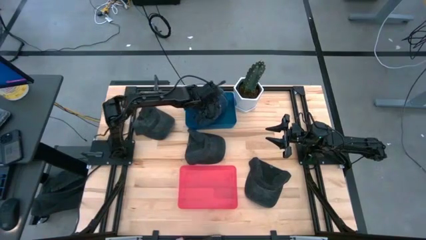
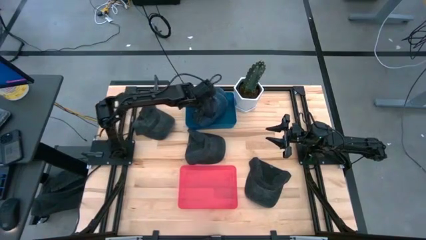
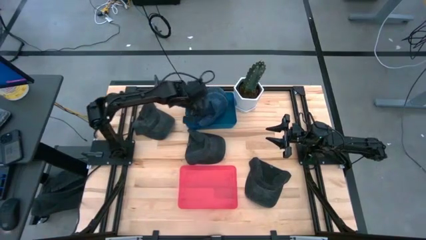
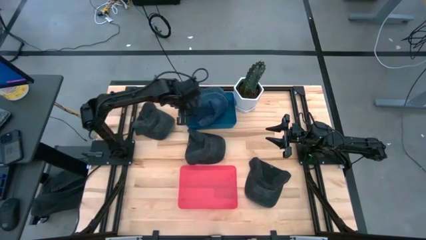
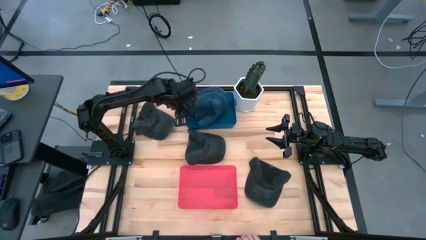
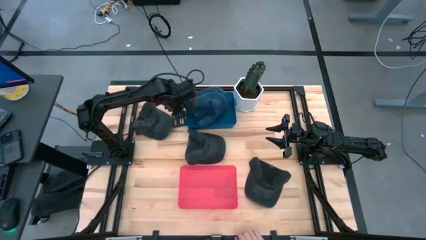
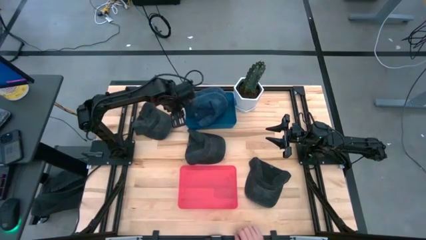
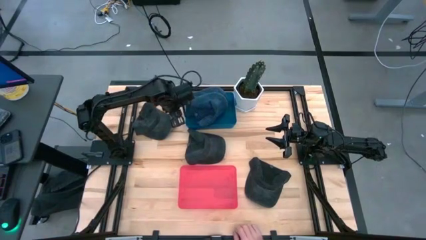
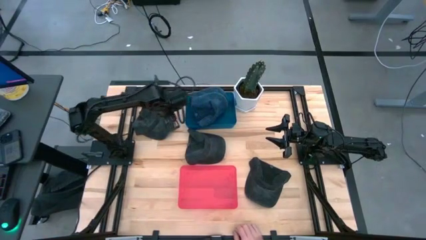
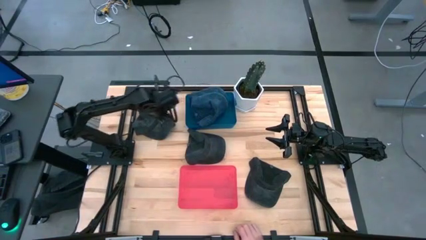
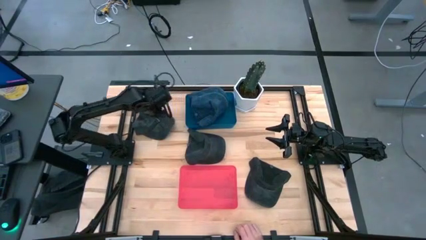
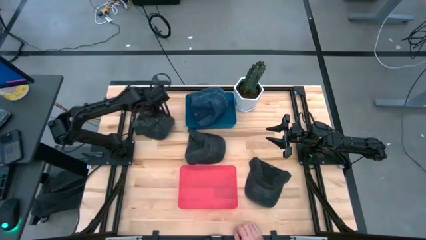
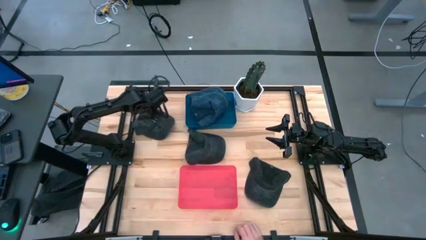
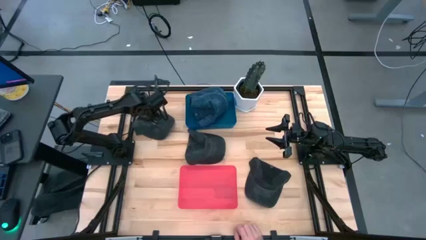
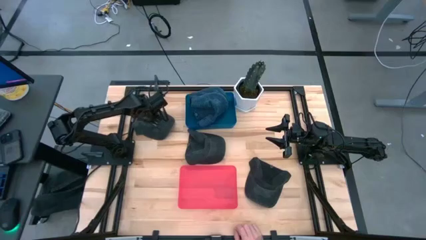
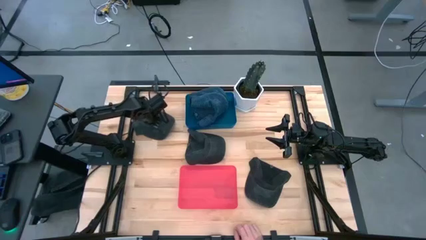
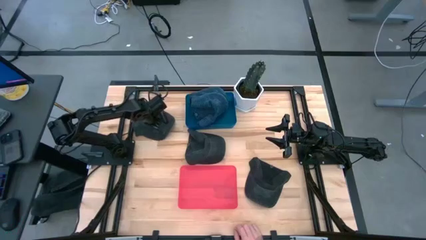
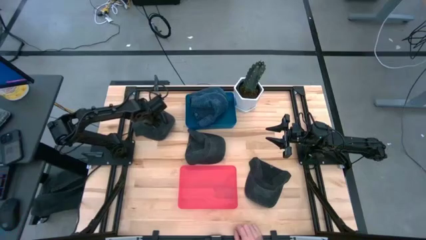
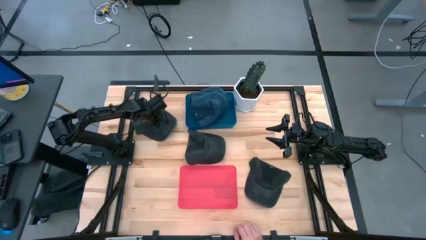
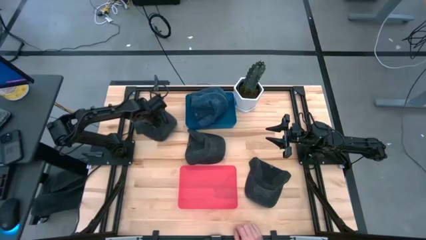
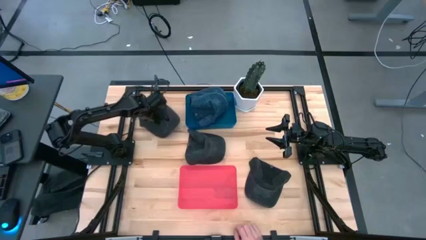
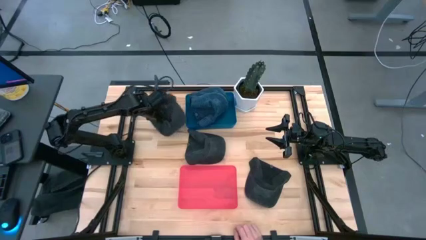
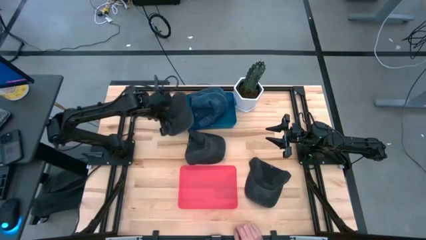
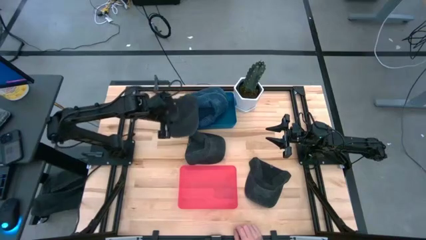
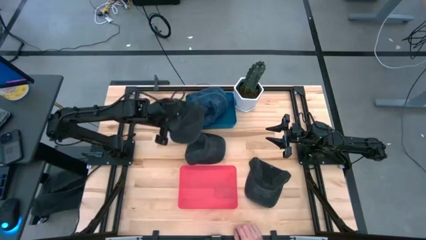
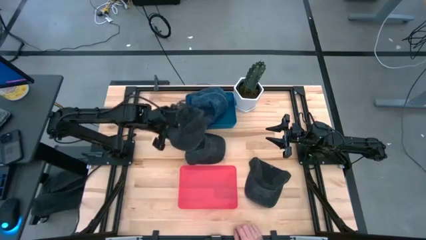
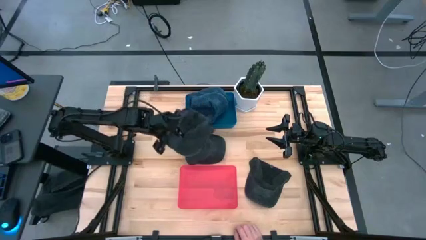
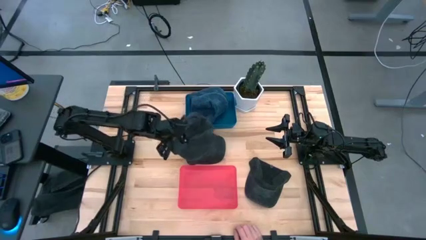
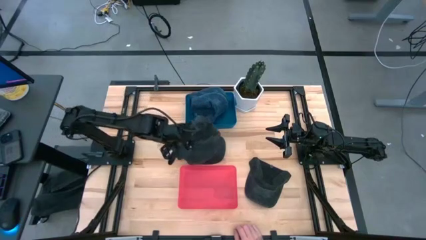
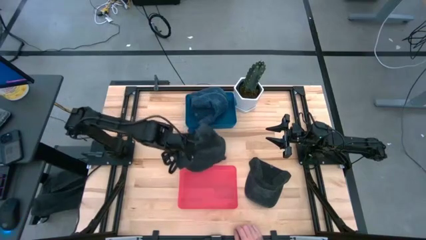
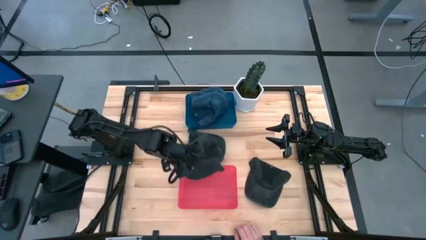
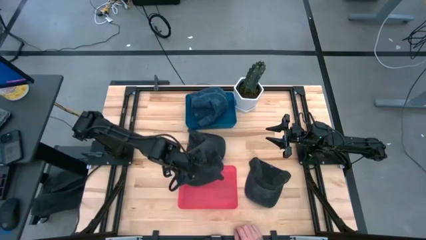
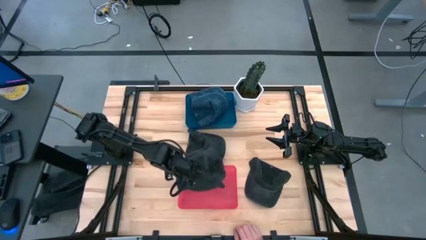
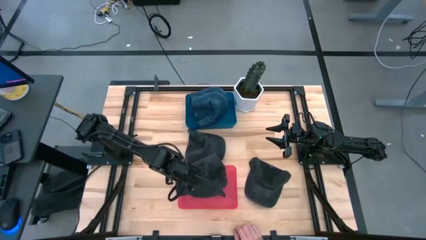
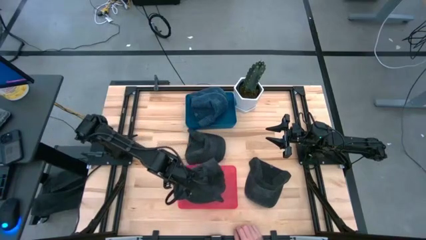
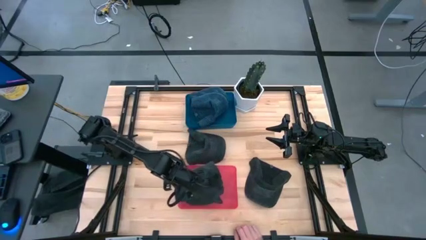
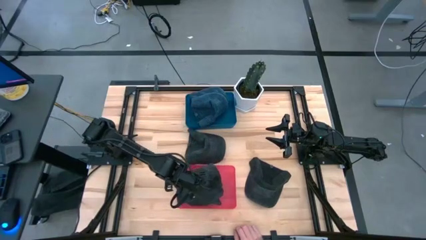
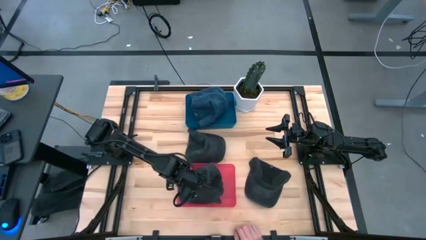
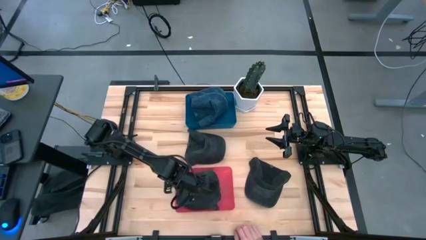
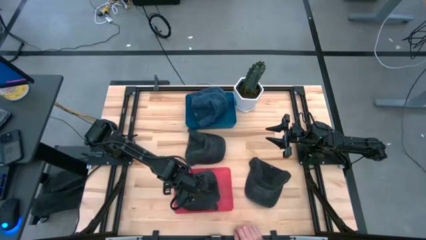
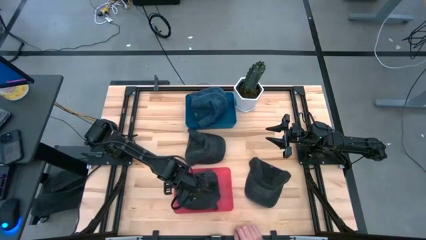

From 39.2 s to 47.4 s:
Task: Pick & Place hat
Put the top left black cap into the pink bin

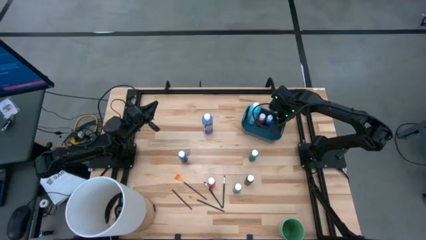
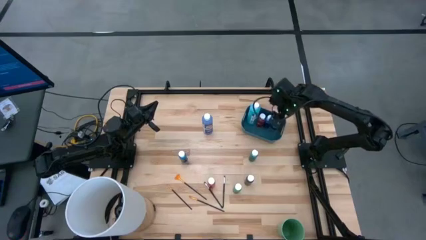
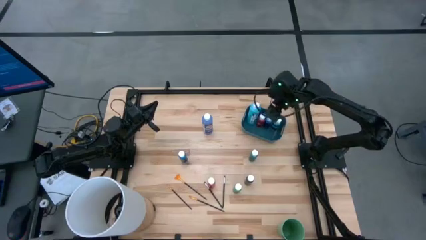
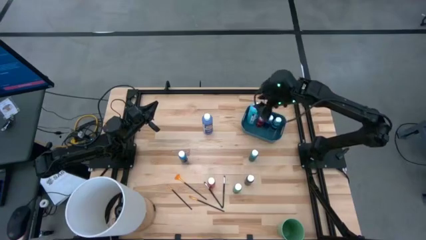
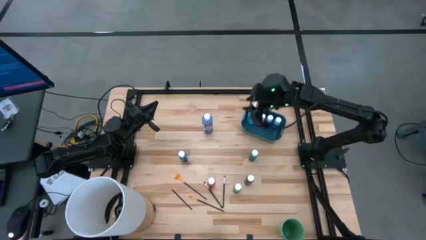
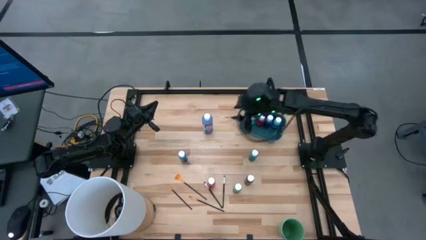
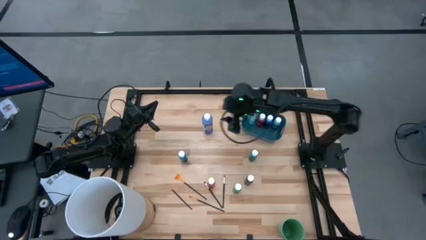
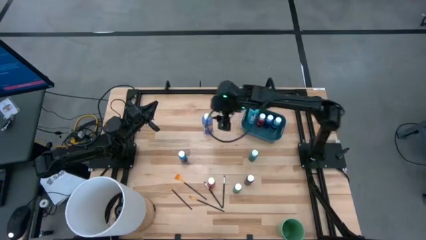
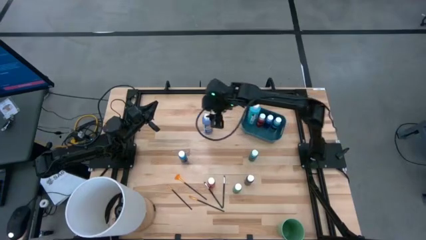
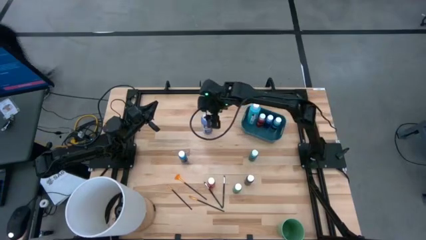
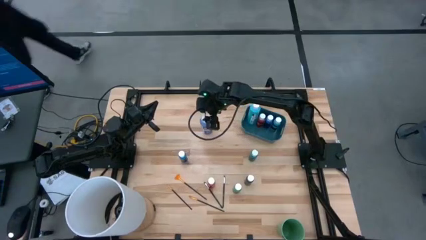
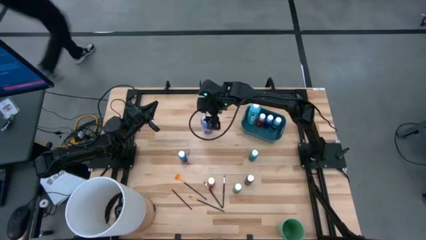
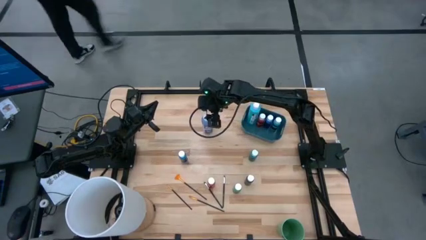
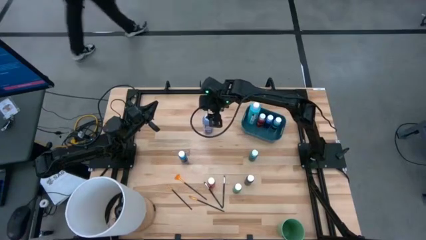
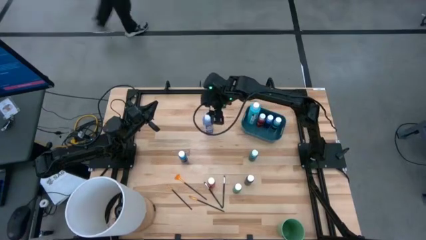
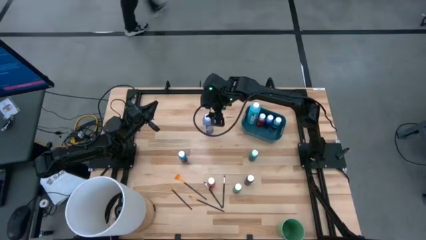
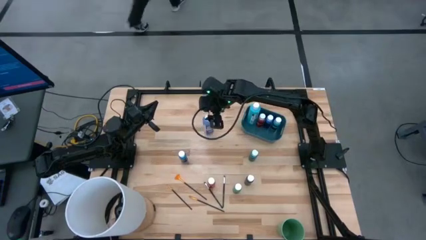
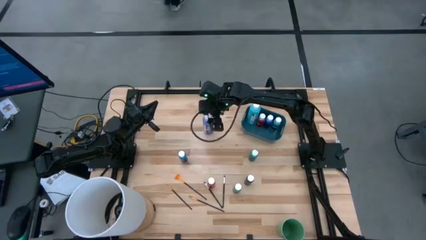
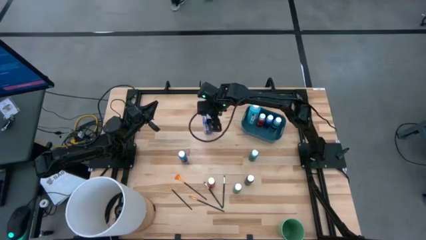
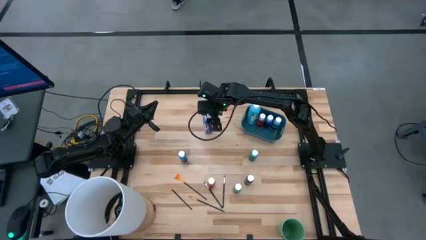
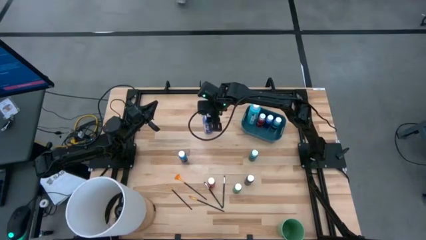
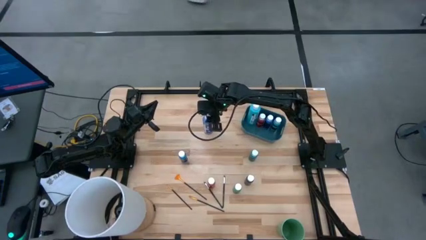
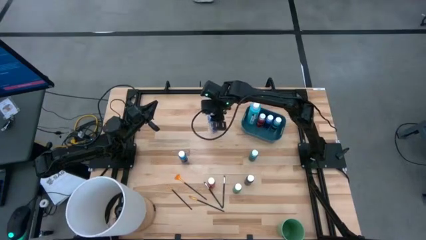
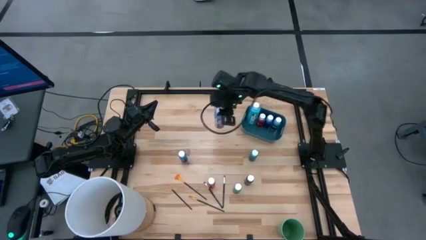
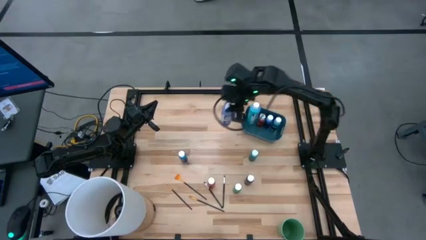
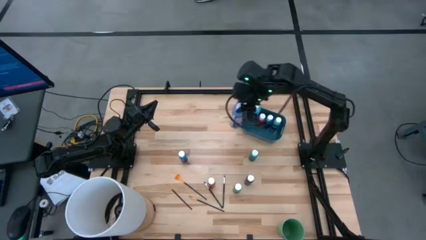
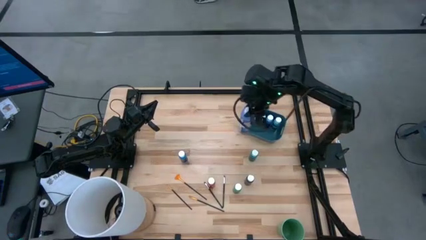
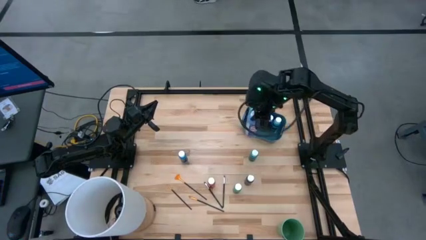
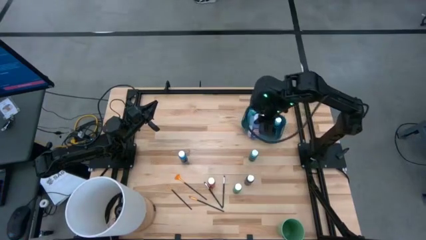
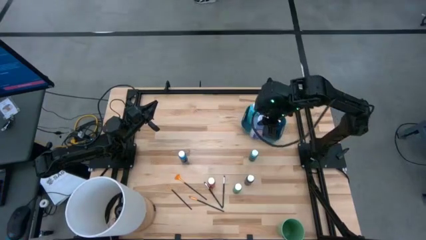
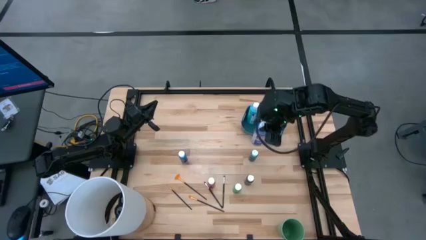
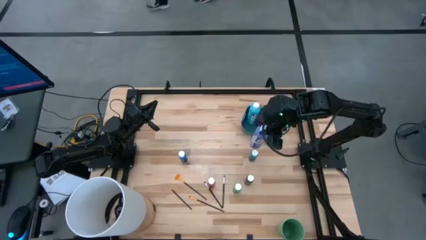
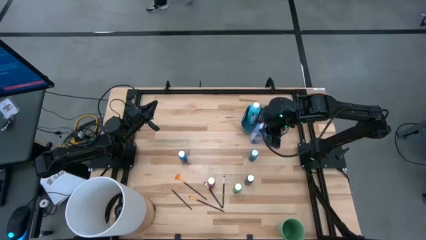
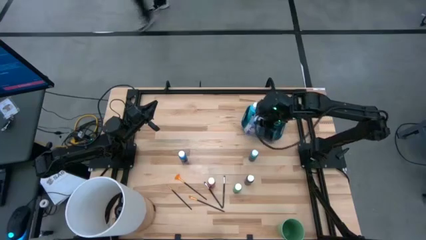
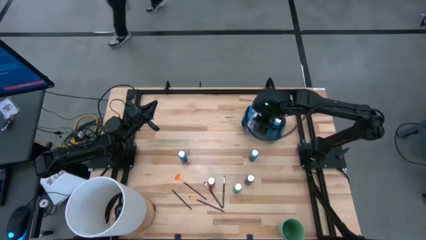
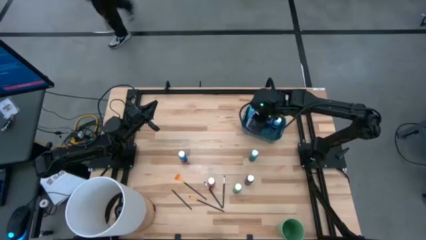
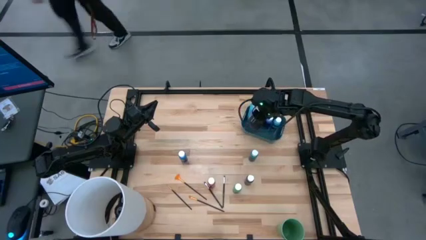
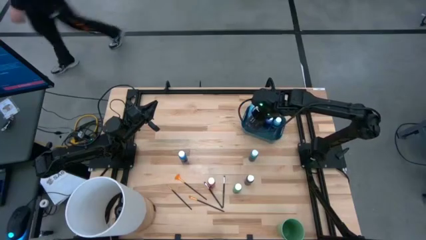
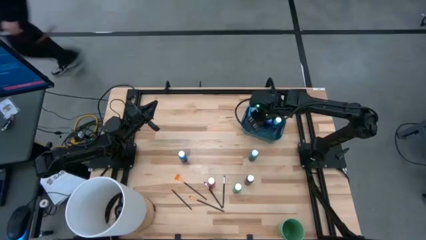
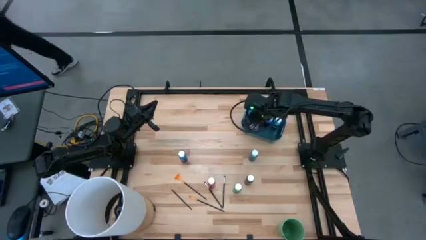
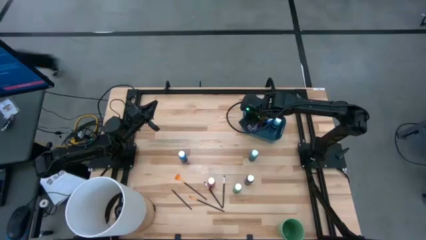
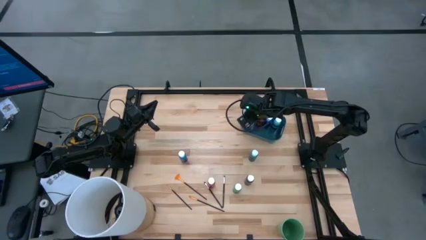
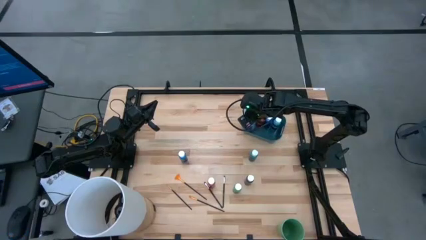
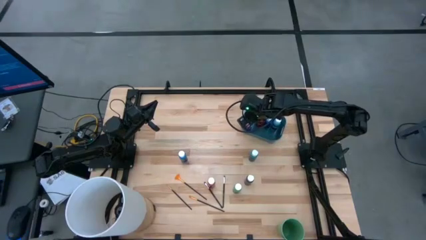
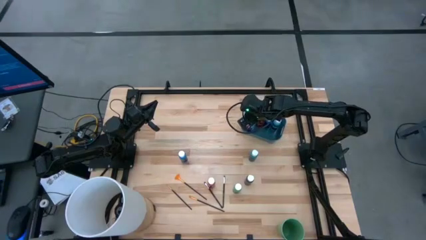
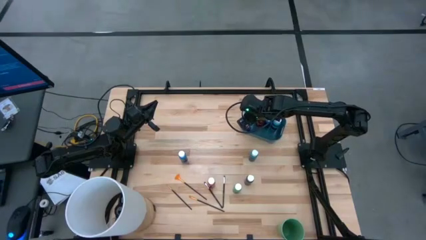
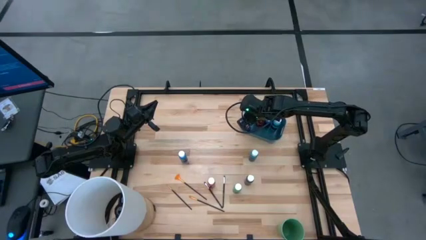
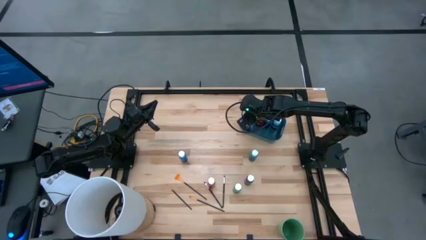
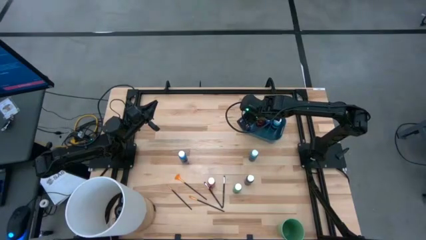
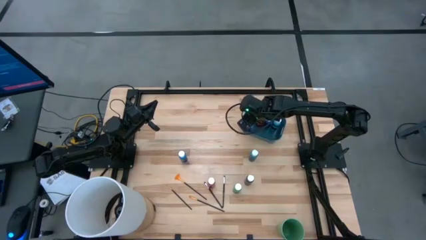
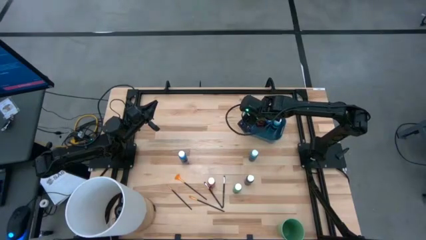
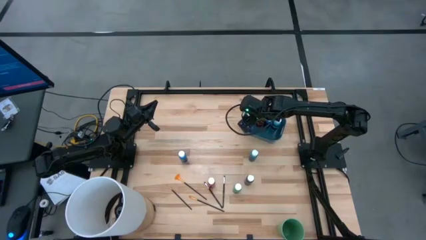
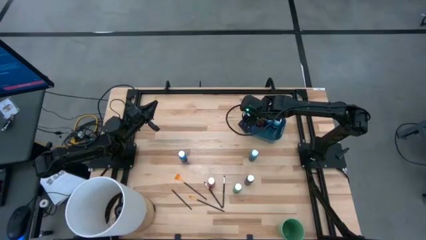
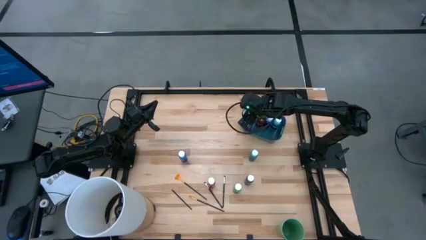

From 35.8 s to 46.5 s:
Task: Pick & Place Paint Supplies
Put the large purple paint bottle into the blue bin
